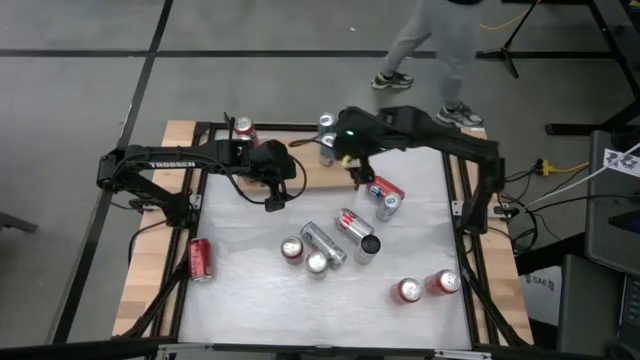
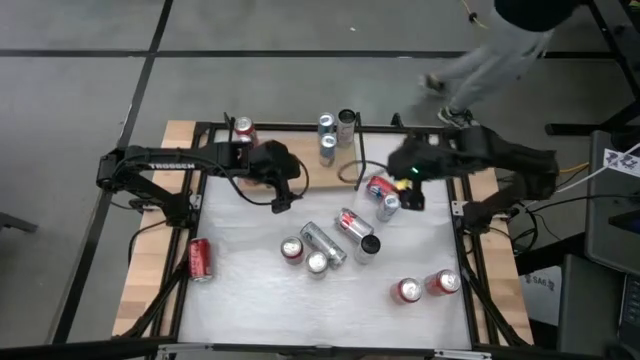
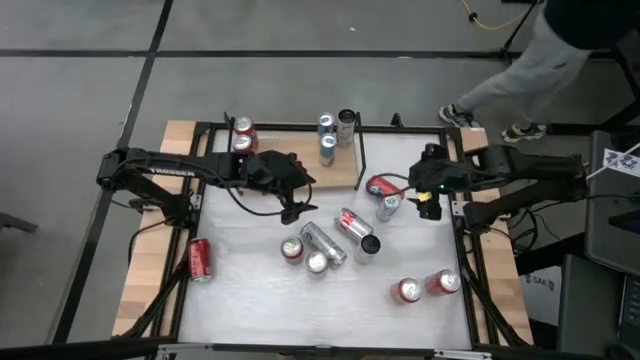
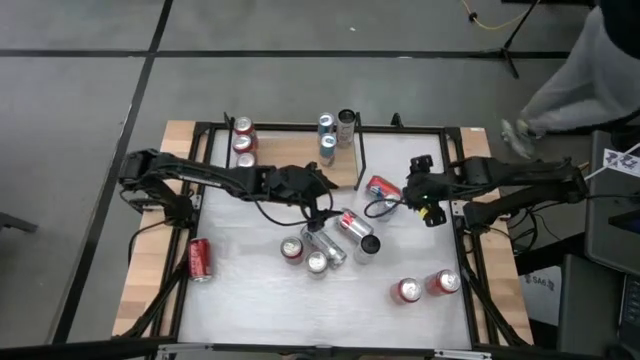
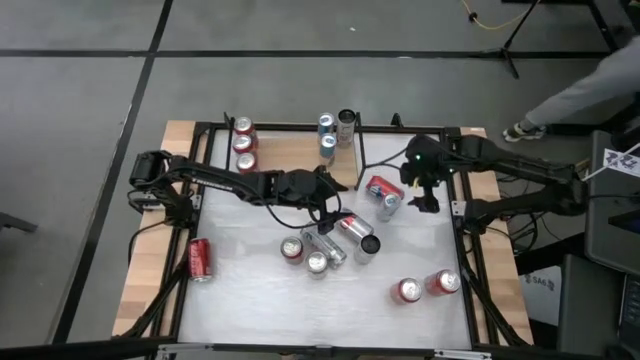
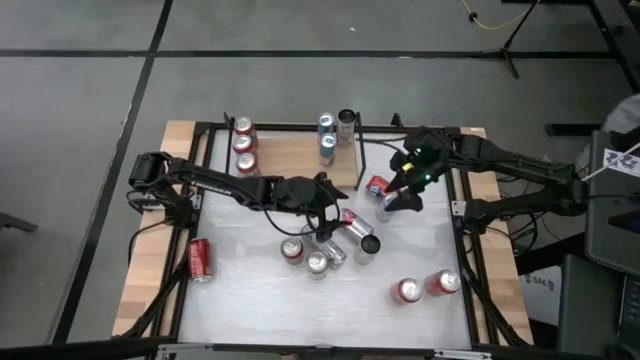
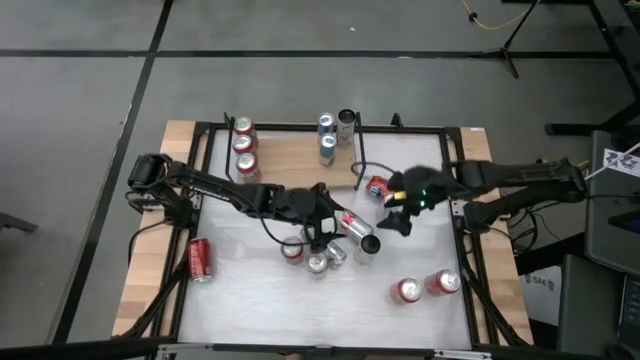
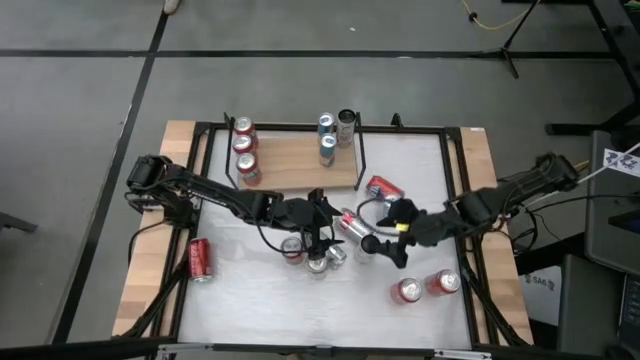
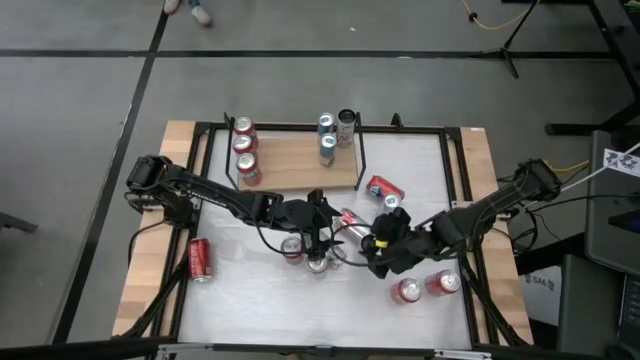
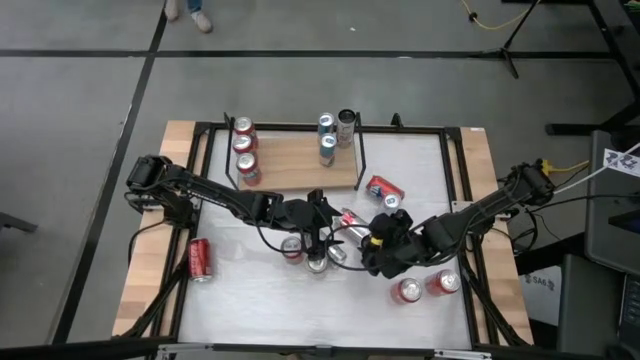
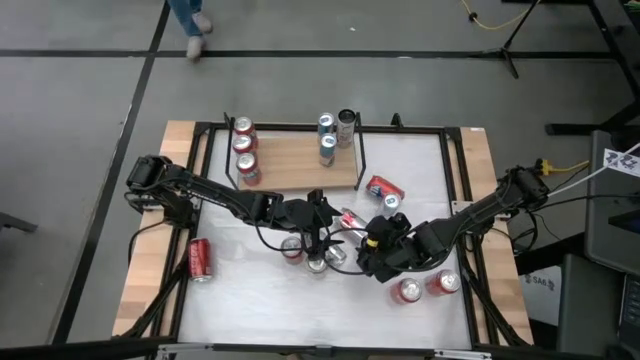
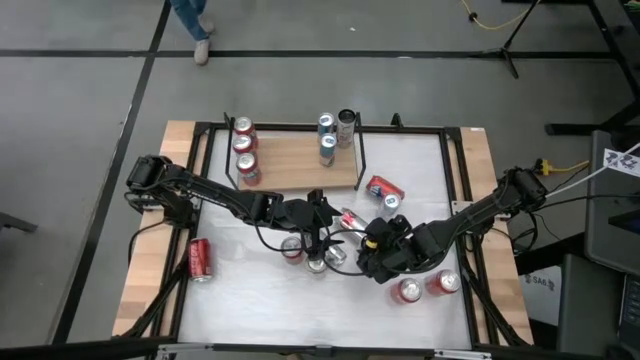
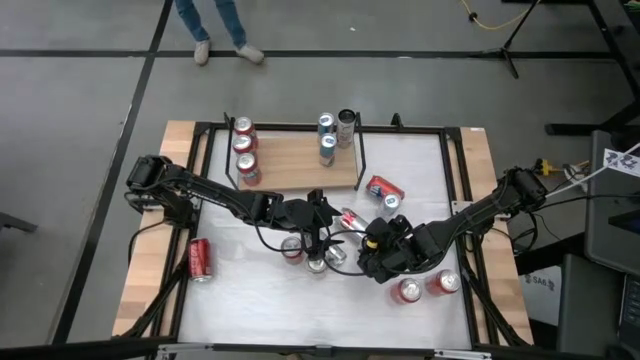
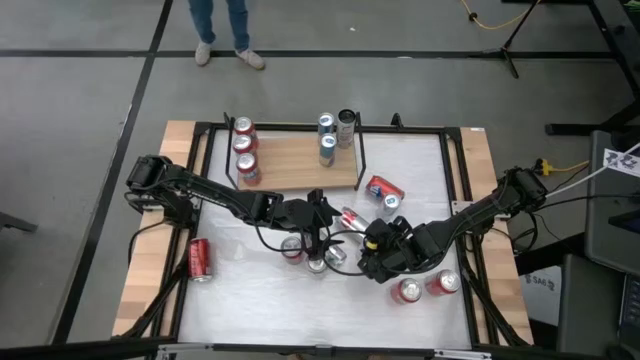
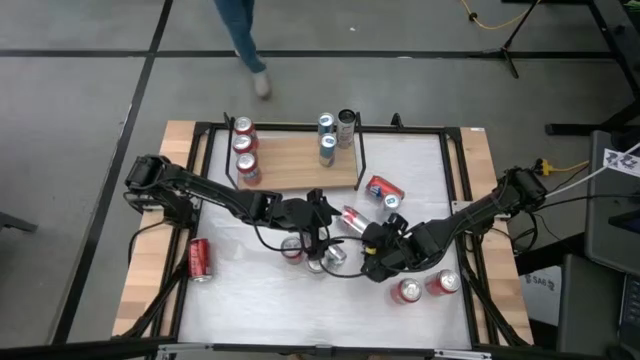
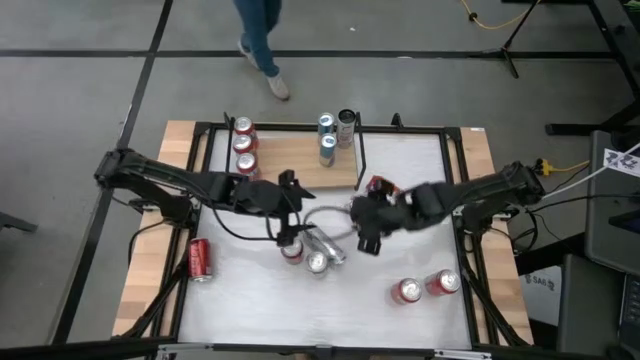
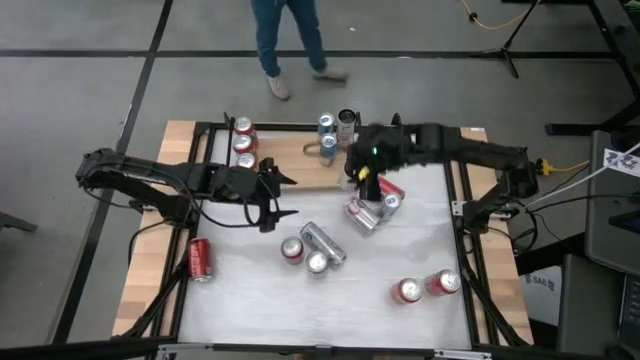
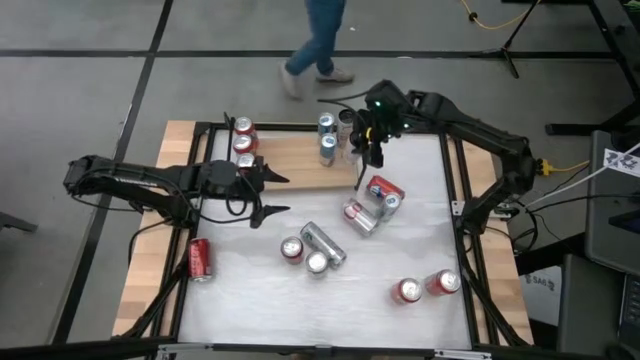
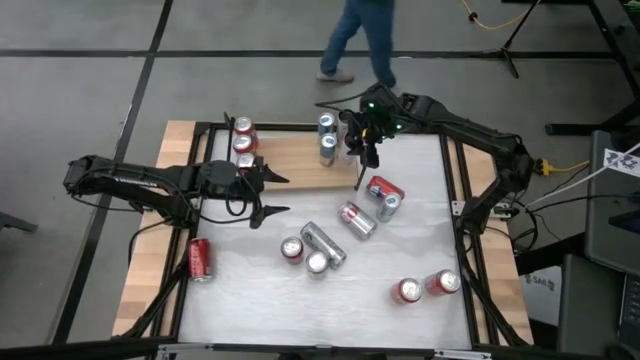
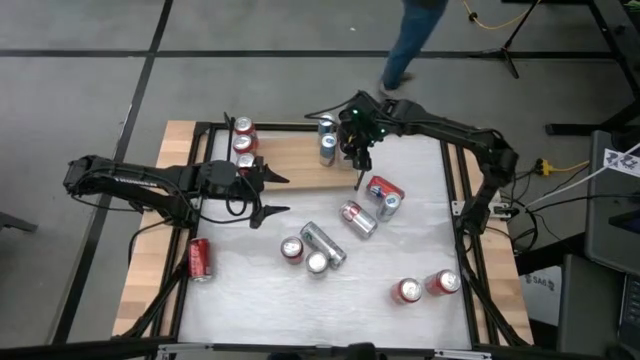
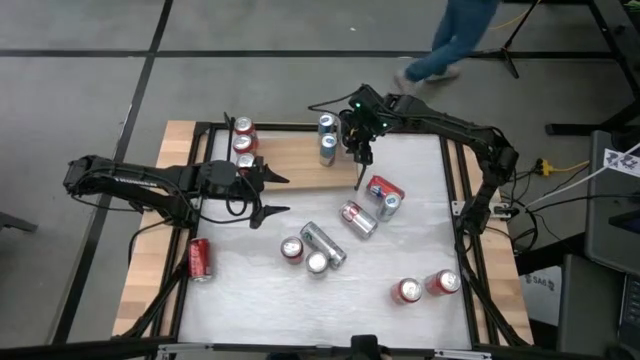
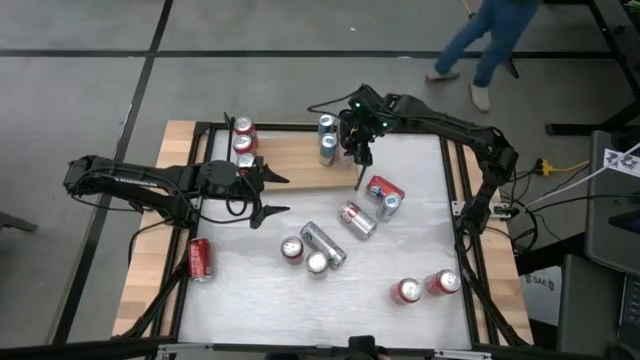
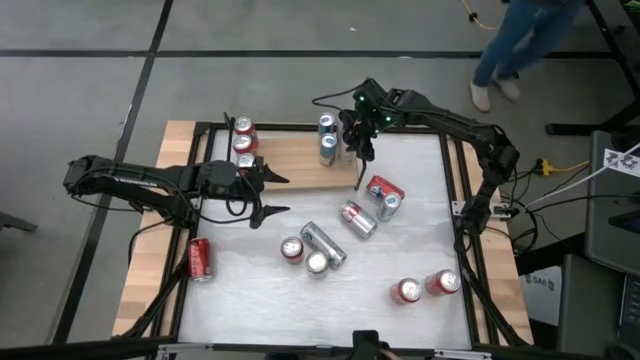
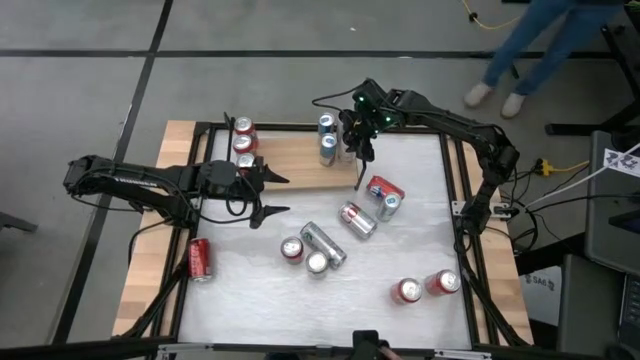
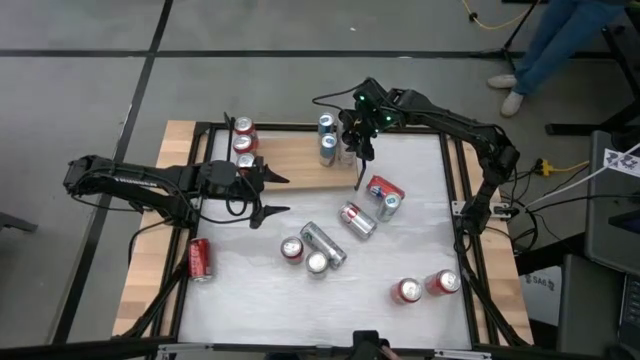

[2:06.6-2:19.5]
Task: Place canned beverage on shelf
Put the white pink soda can on the shelf aligned with the other white pink soda can

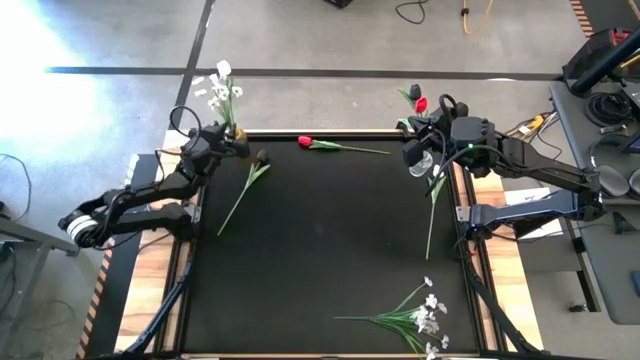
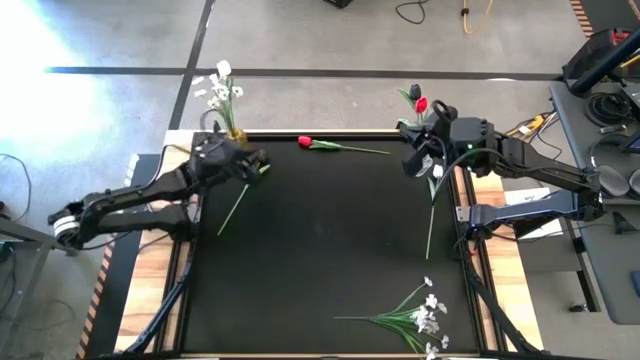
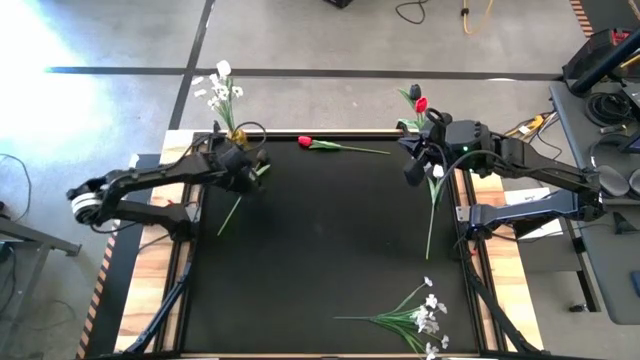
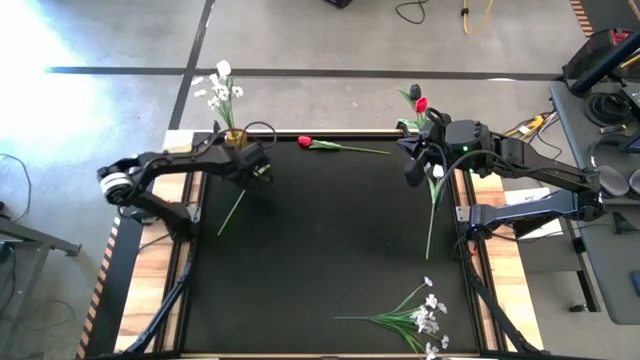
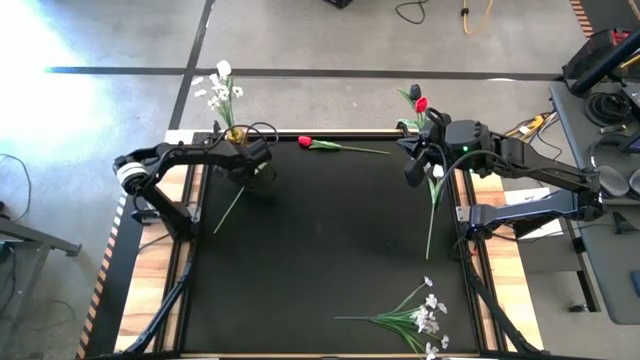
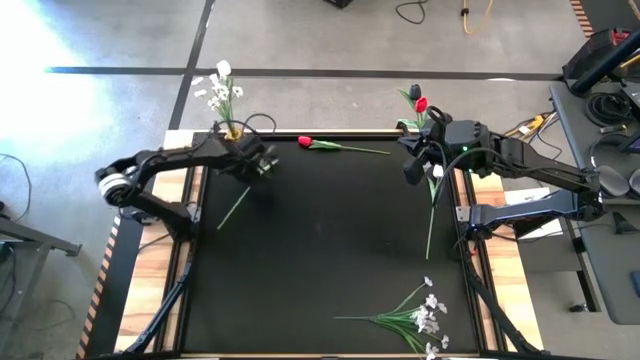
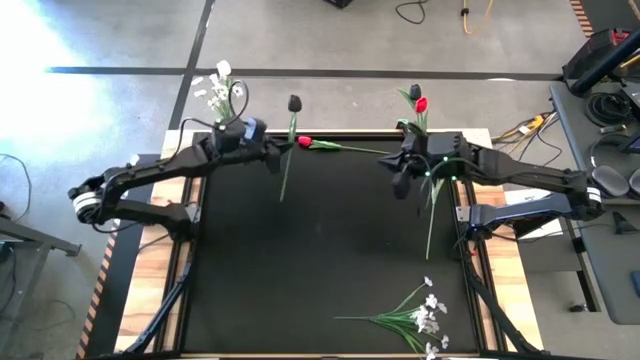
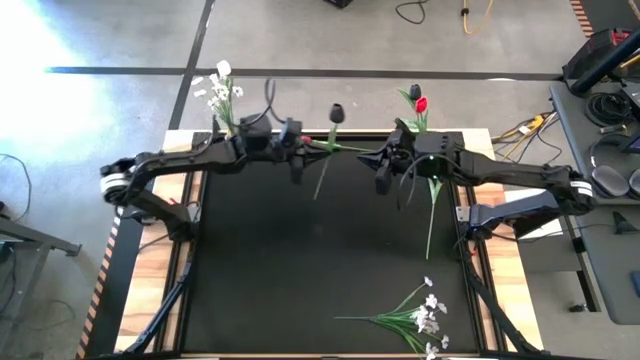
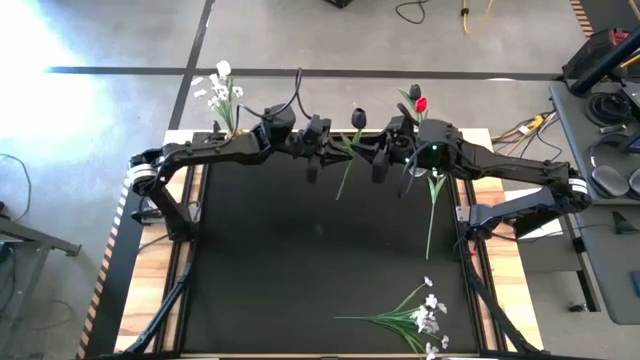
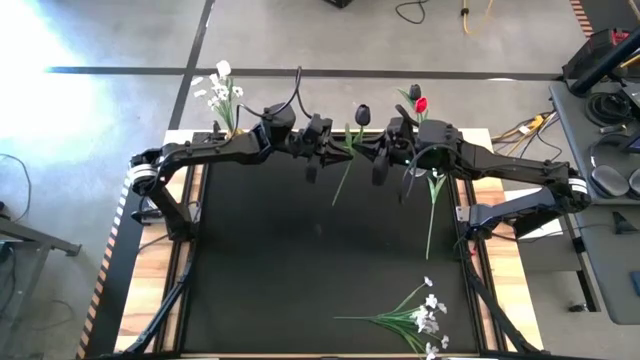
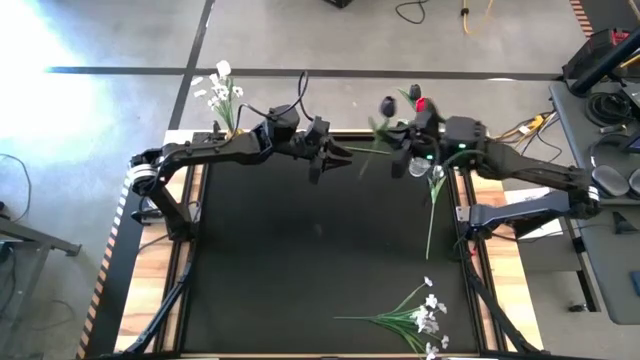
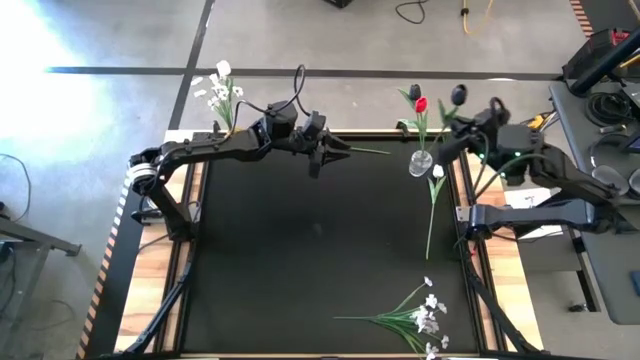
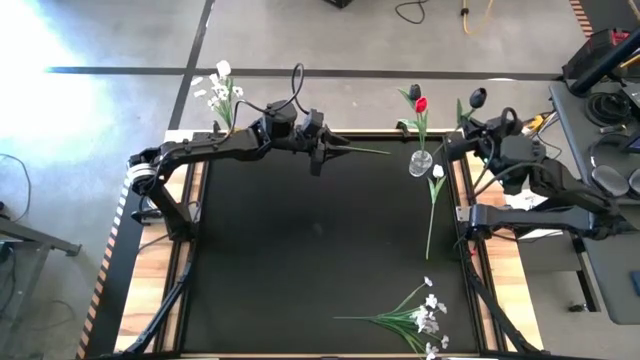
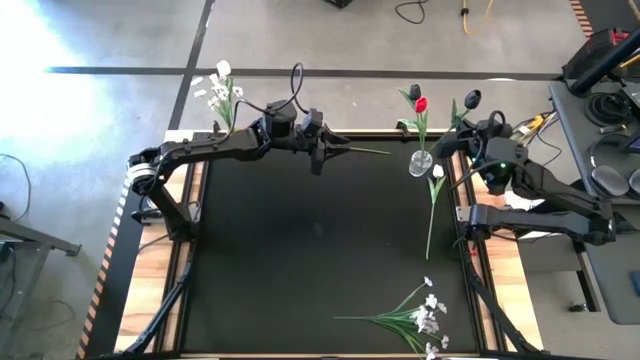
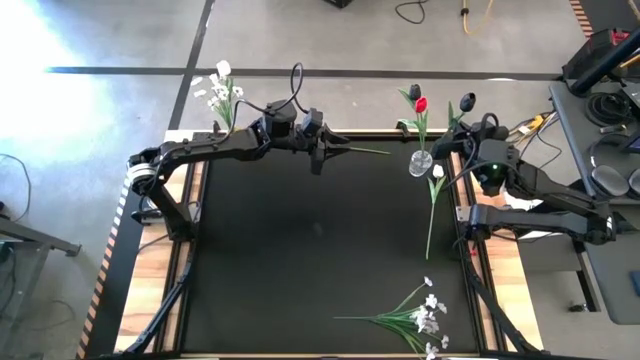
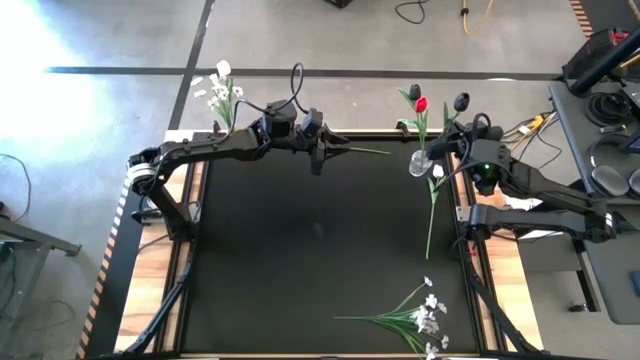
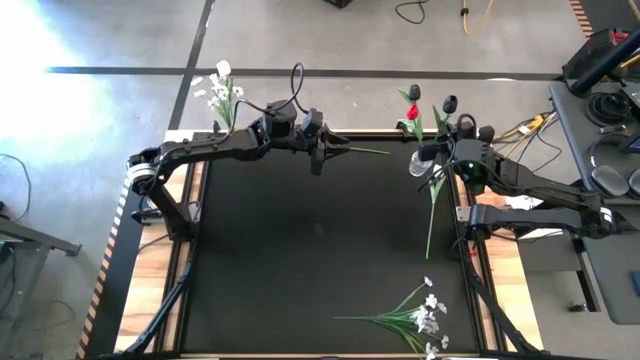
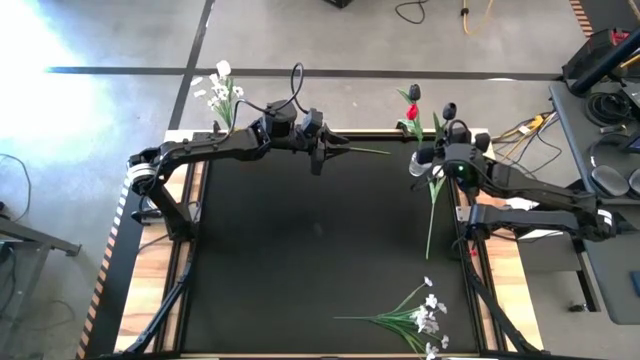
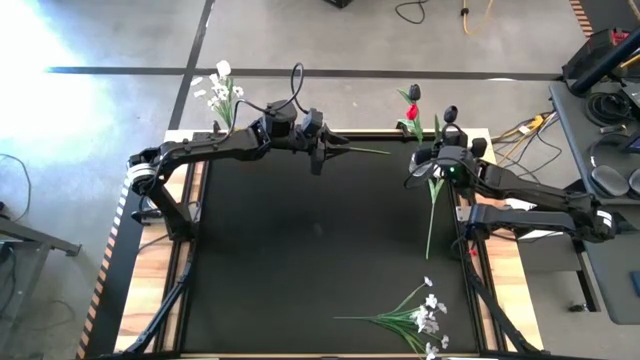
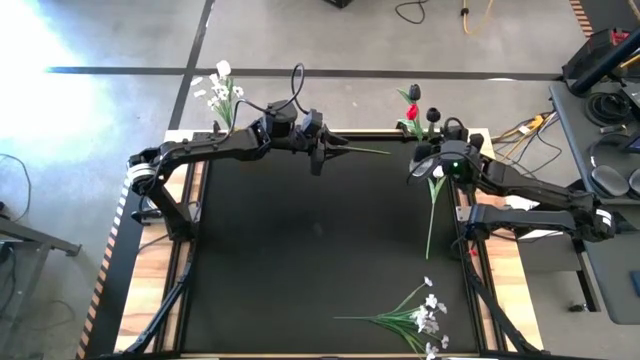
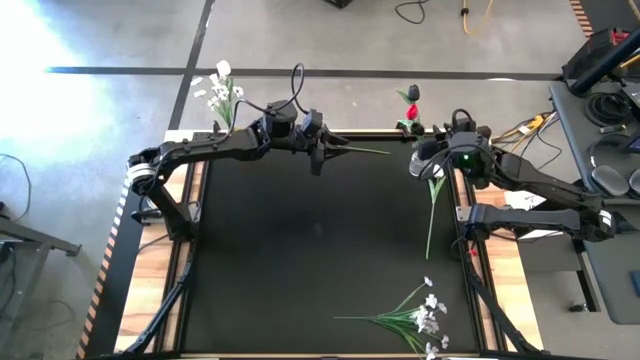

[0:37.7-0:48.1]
Task: Sort flowers into vase by color
Put the black tulip into the transparent vase
